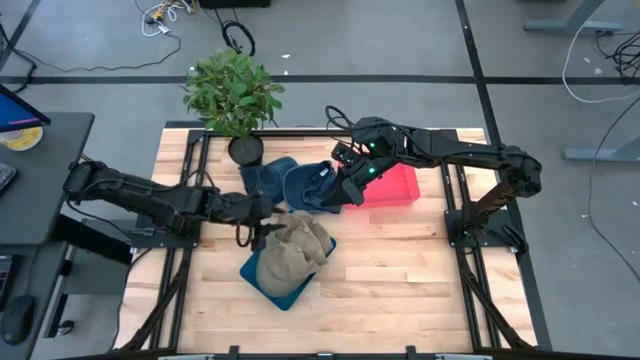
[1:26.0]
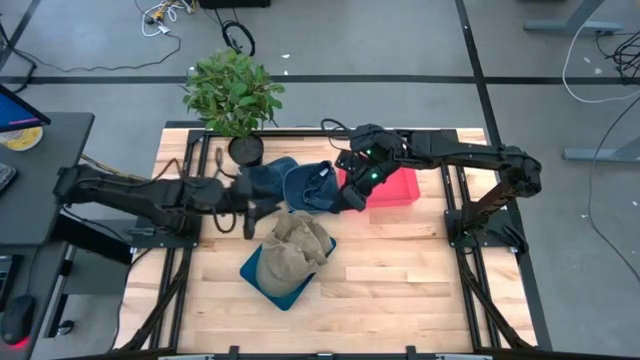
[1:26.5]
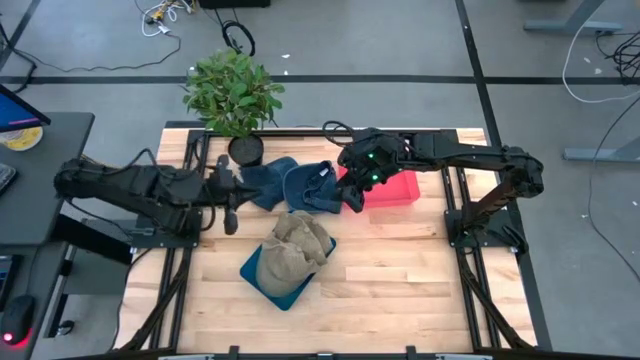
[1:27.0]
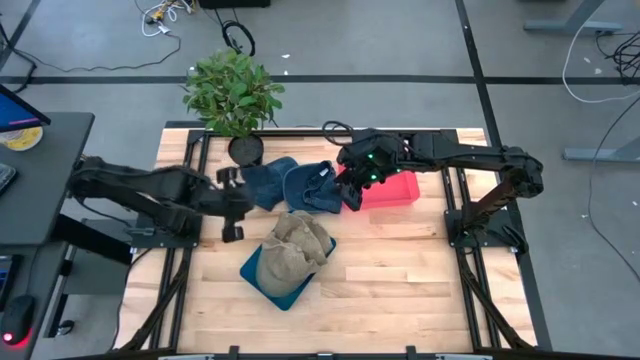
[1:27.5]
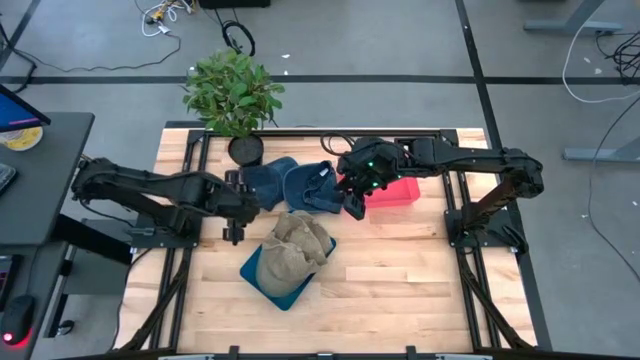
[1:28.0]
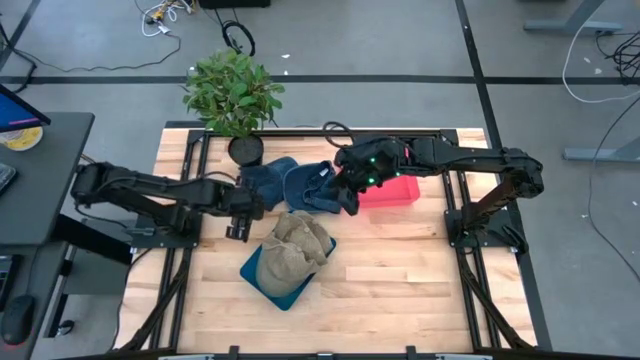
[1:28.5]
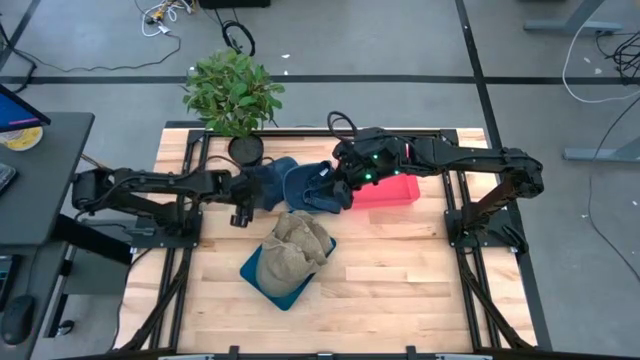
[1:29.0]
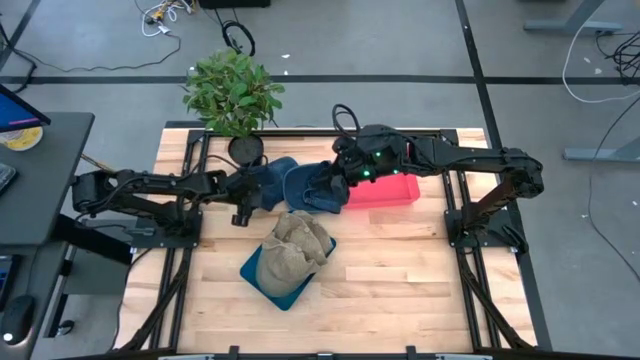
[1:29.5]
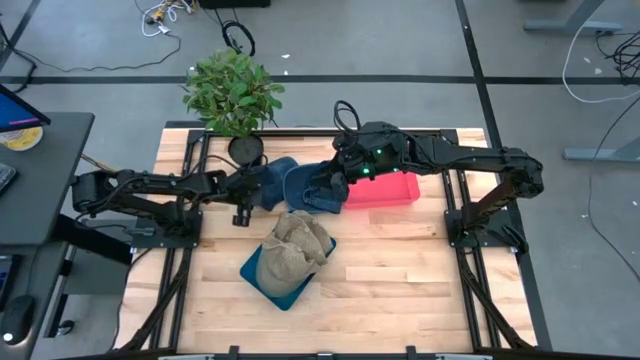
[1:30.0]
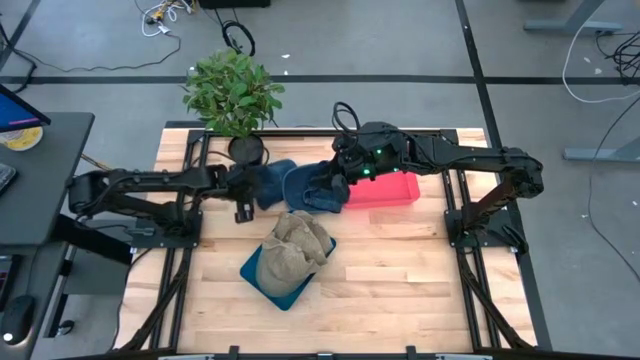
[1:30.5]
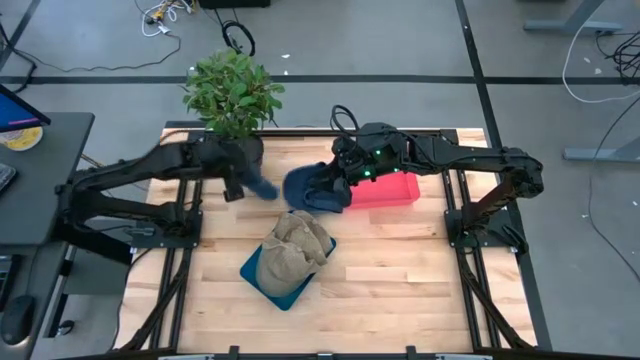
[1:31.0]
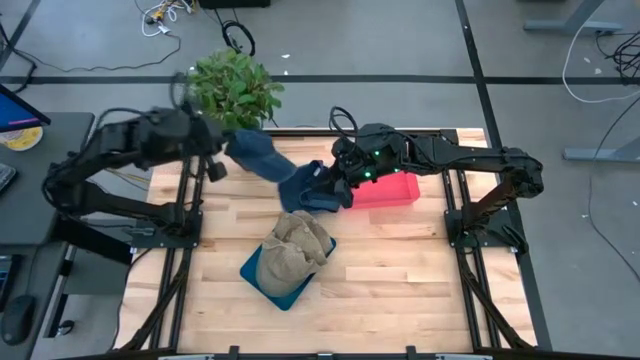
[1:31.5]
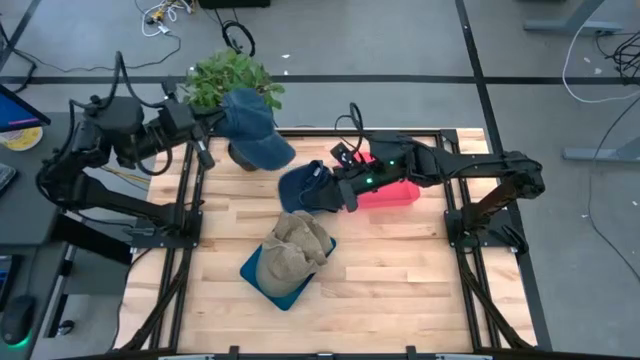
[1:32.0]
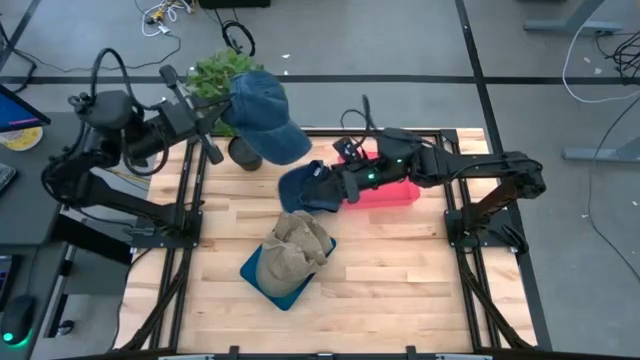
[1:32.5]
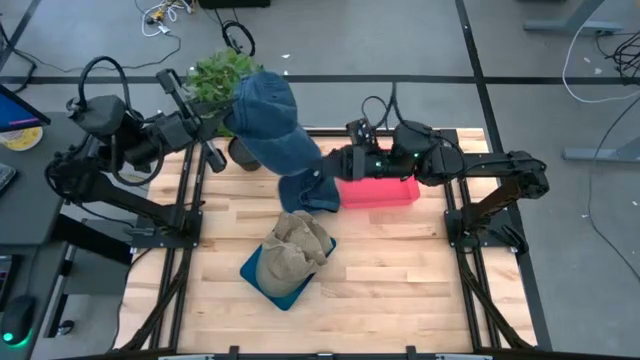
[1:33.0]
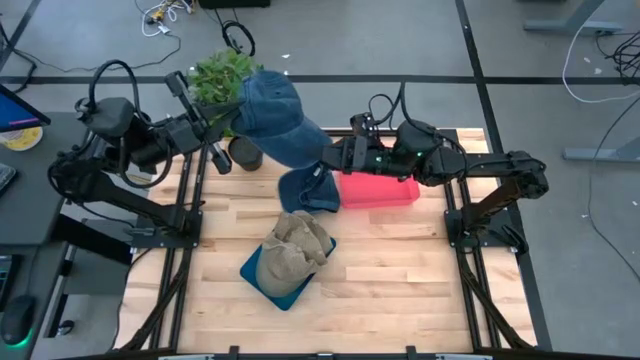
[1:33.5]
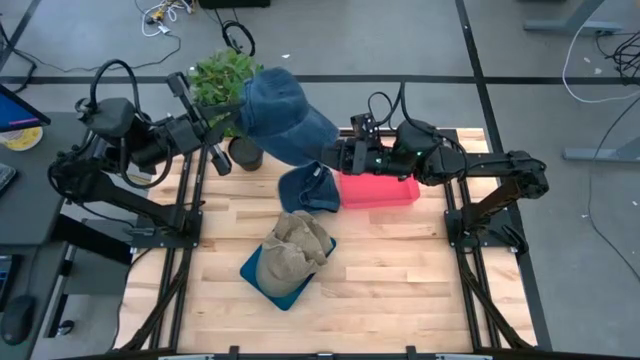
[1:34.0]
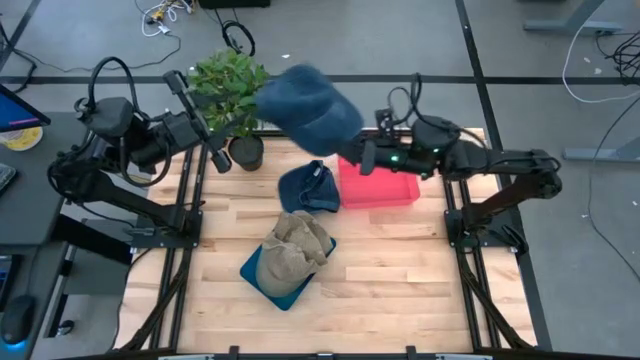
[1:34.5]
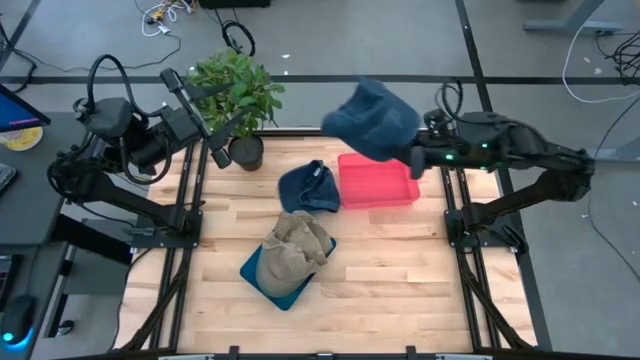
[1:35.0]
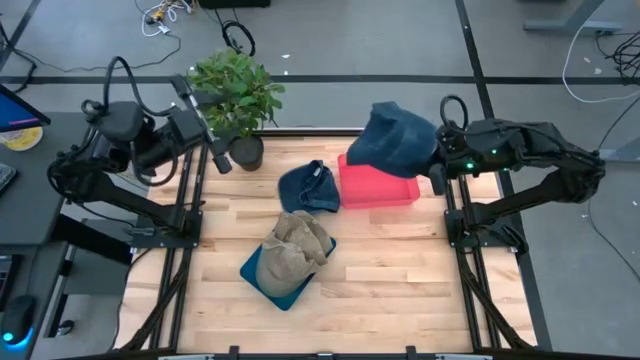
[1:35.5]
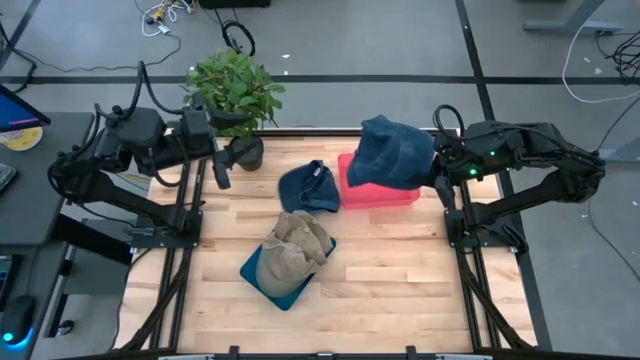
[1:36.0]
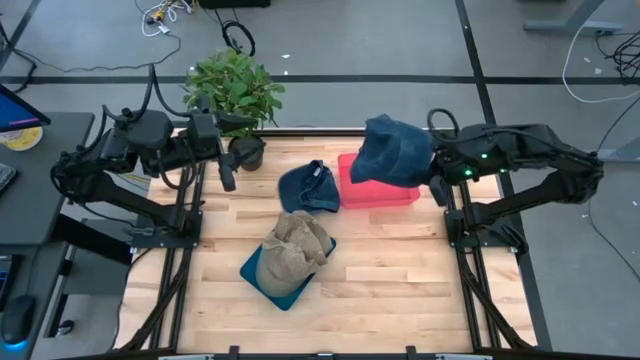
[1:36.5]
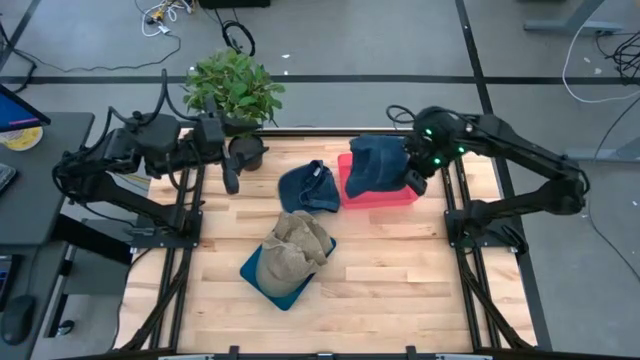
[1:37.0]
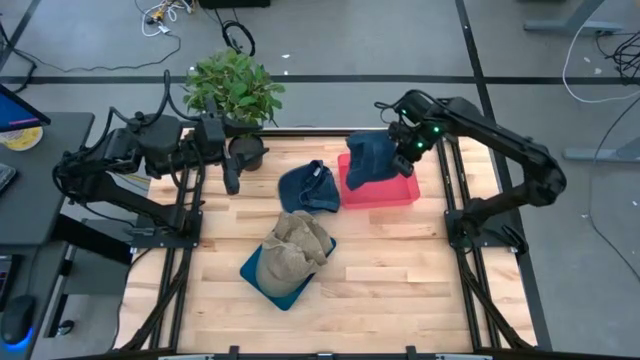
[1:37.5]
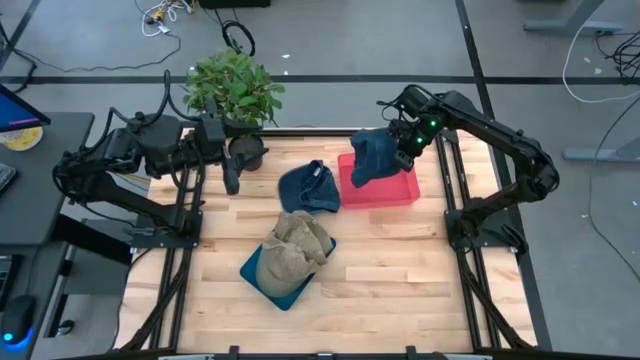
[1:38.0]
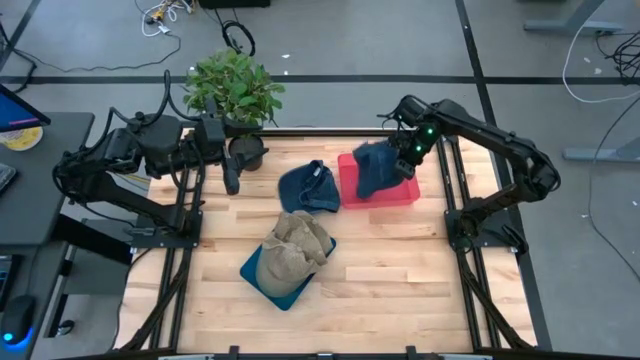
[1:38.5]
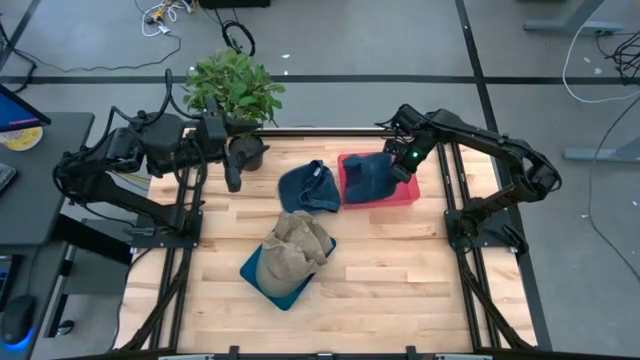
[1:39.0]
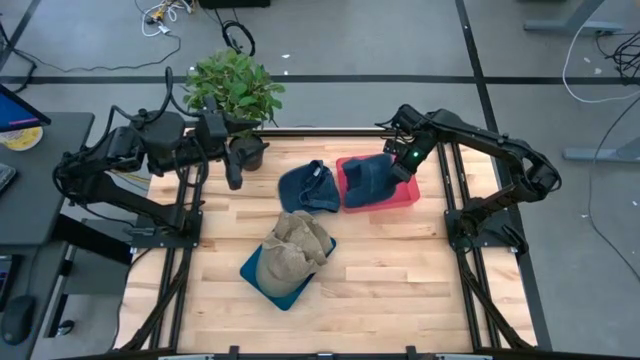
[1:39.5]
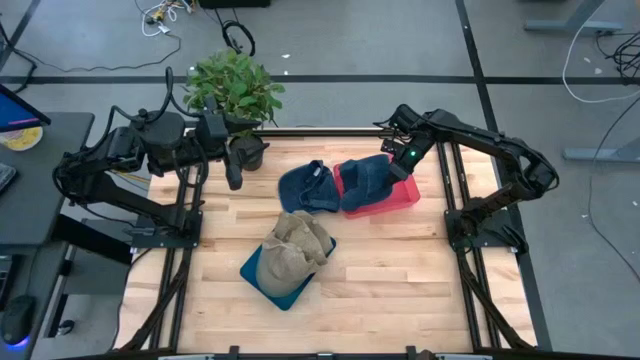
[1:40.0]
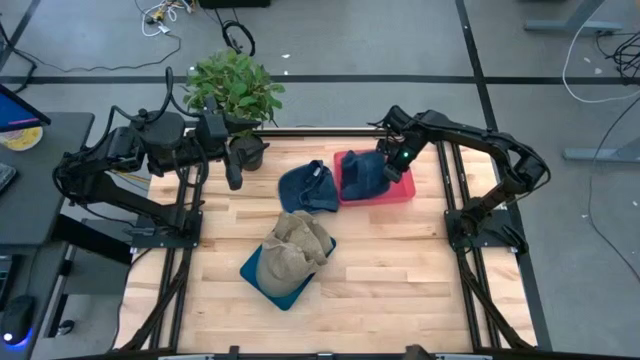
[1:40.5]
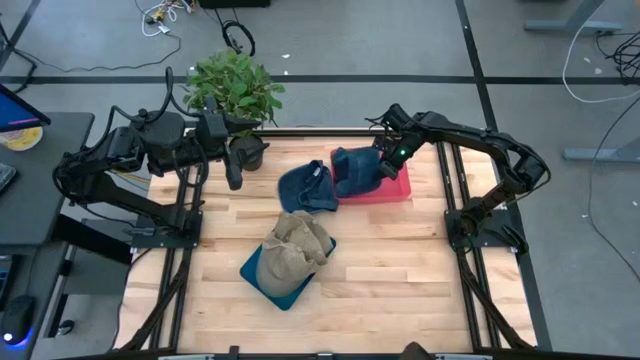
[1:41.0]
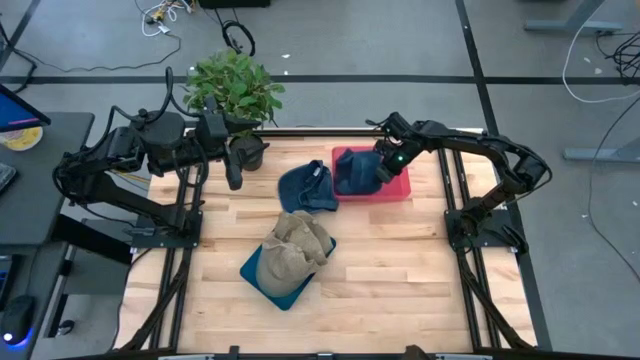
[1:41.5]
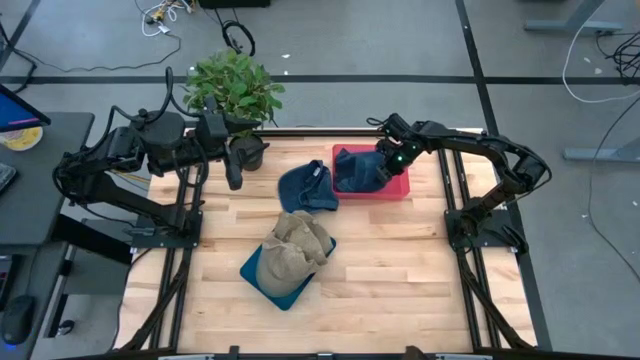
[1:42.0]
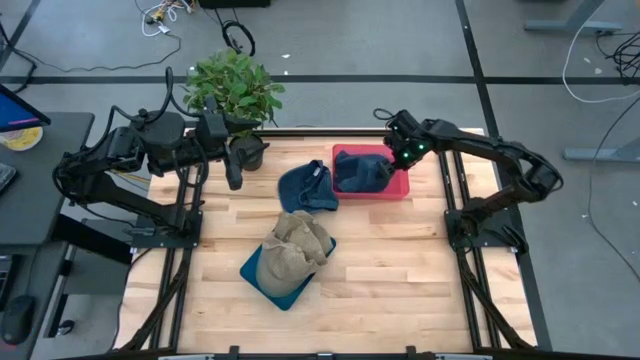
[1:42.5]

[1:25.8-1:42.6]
Task: Pick & Place hat
Put the left blue cap into the pink bin

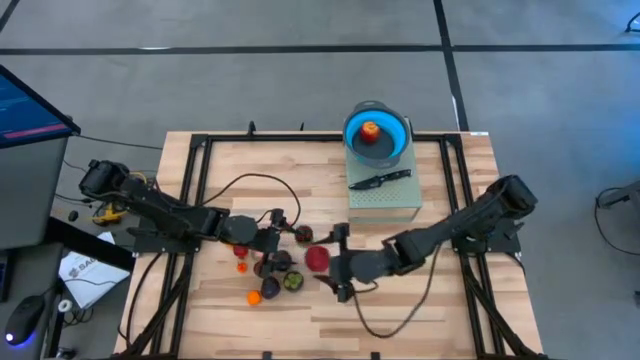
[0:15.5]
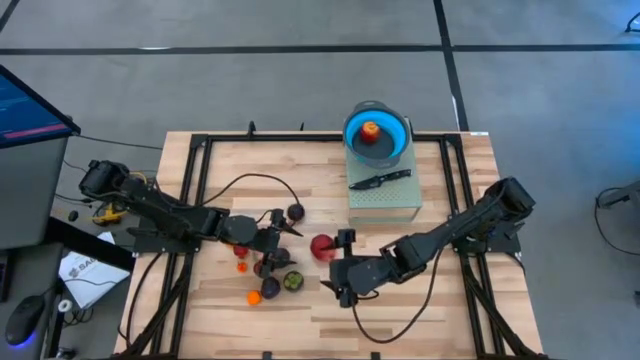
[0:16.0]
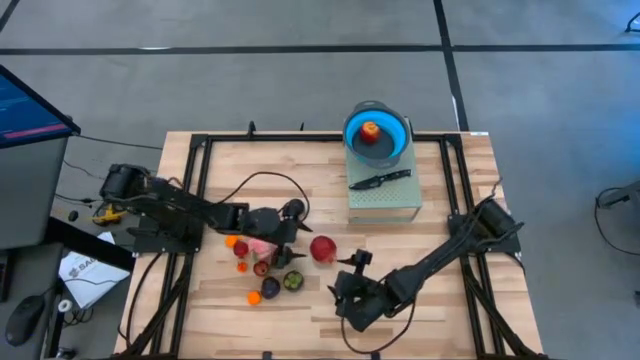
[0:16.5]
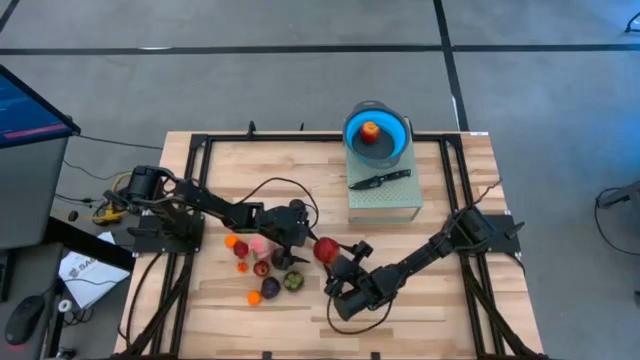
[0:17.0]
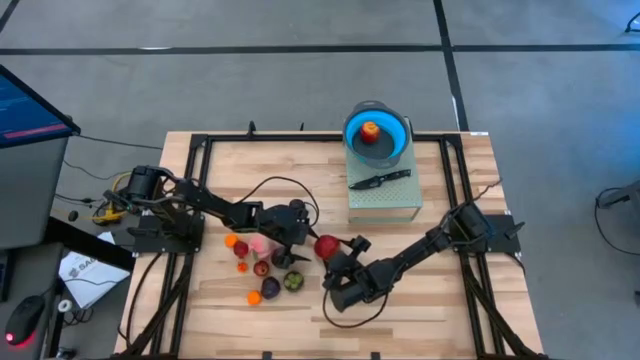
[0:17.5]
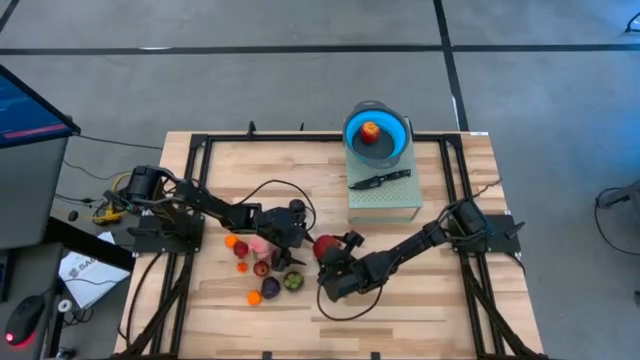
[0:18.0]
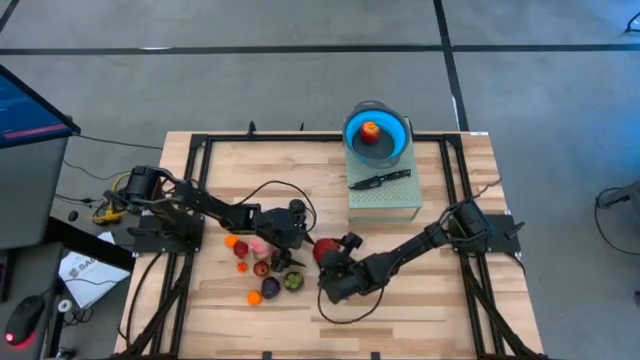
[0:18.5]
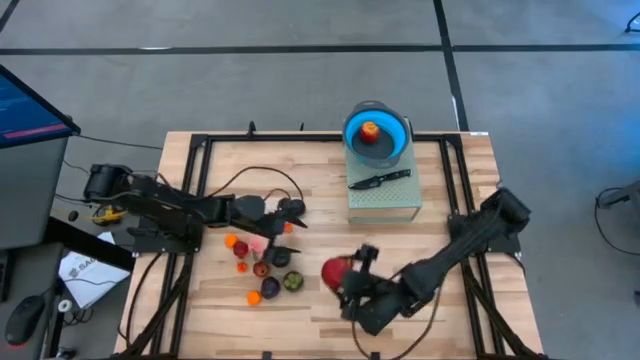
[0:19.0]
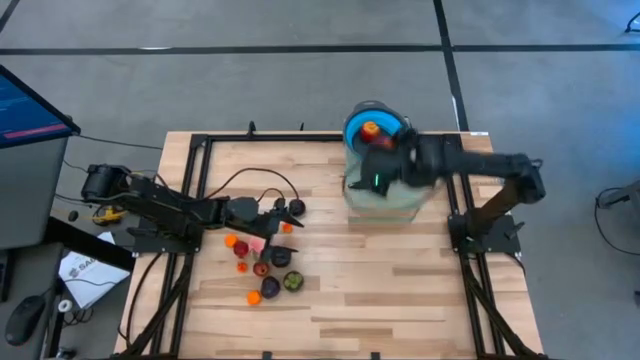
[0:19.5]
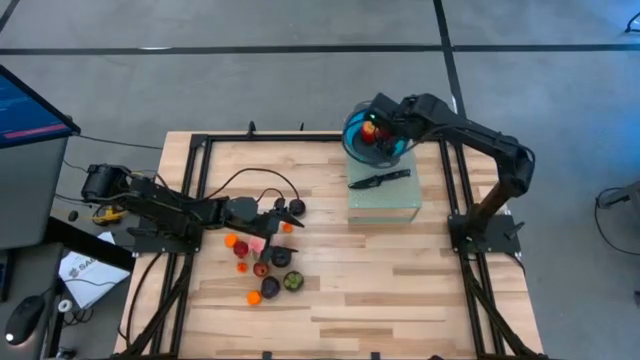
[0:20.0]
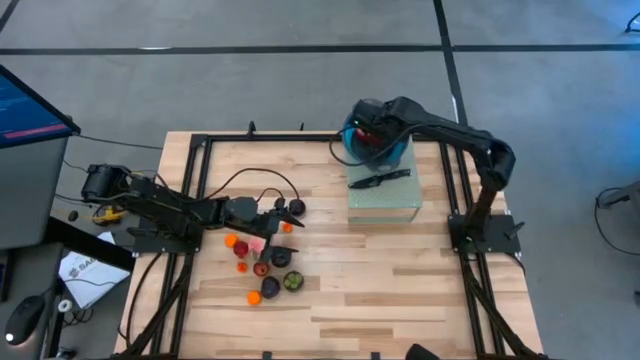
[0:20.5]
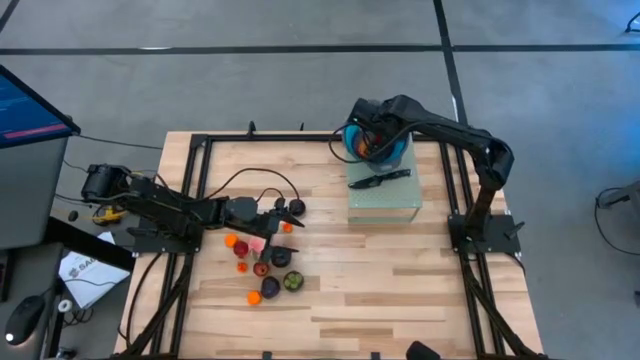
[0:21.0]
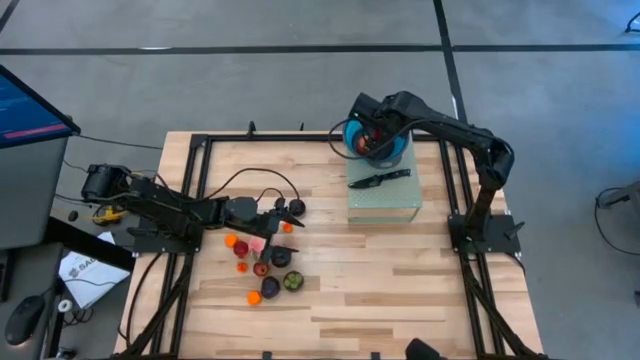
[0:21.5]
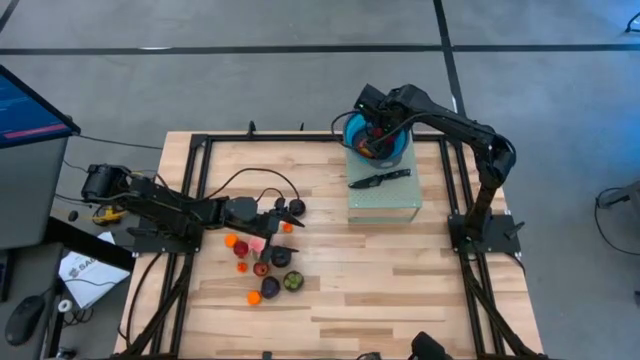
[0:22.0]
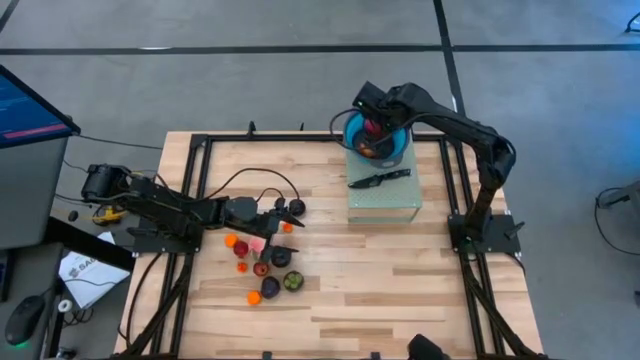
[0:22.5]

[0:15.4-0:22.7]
Task: Pick & Place Fruit
Put the right red pomegranate into the blue strainer bowl on the shelf
